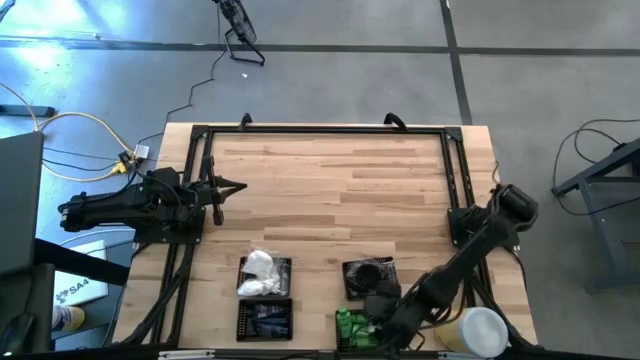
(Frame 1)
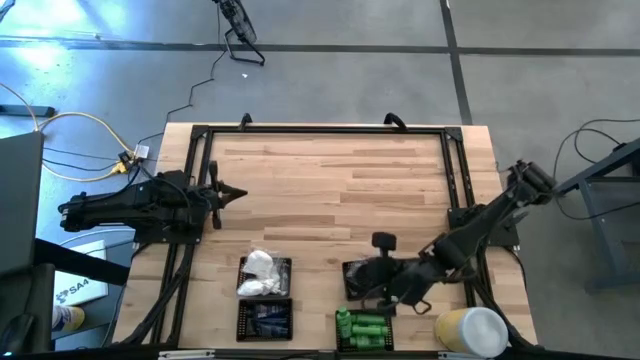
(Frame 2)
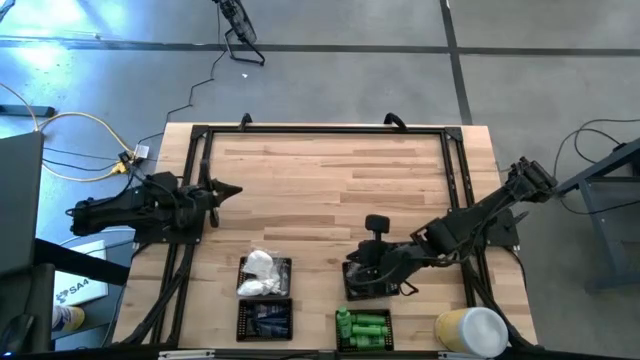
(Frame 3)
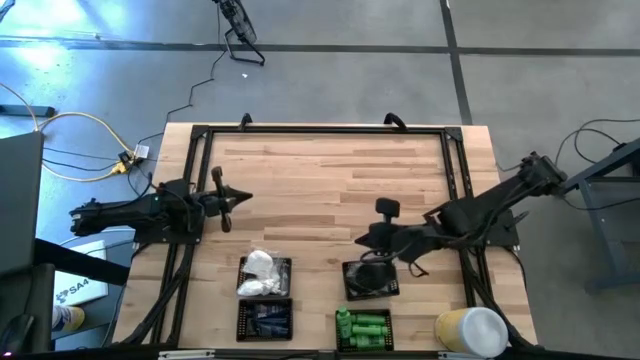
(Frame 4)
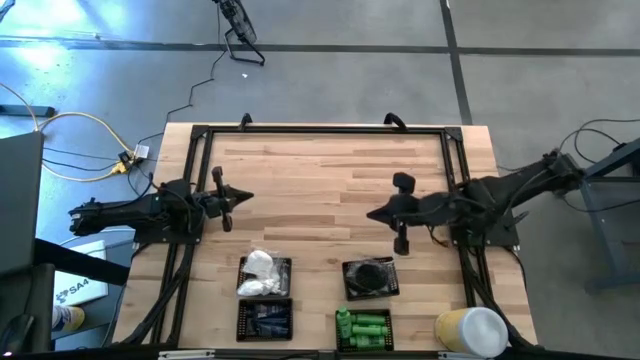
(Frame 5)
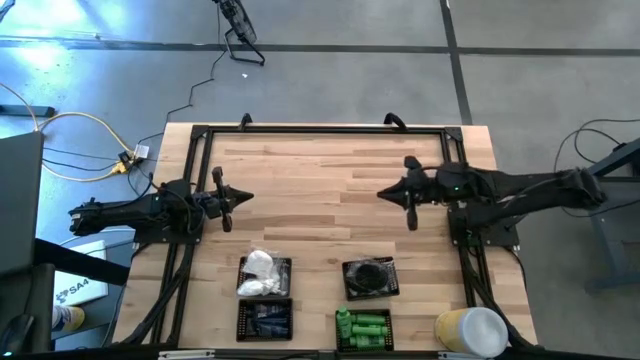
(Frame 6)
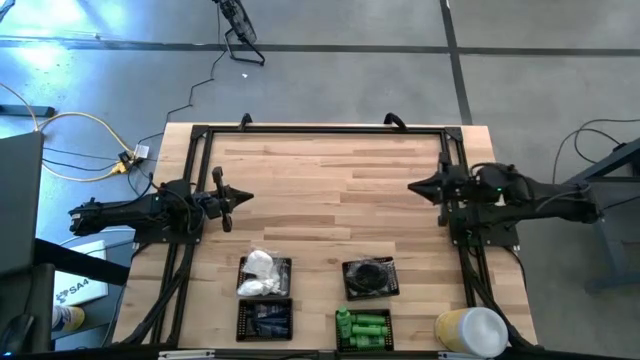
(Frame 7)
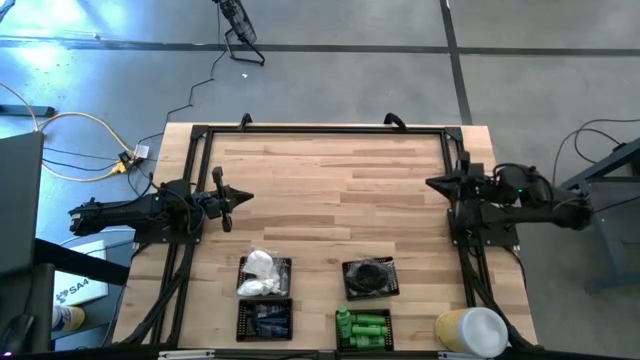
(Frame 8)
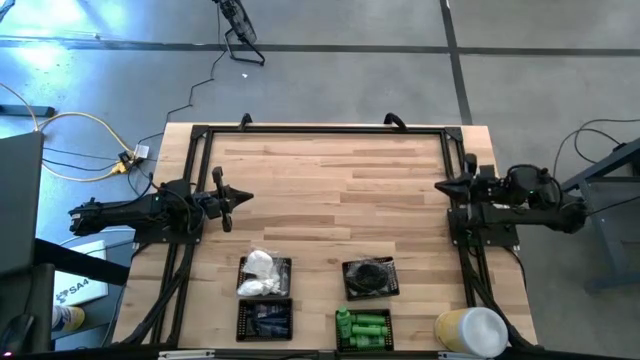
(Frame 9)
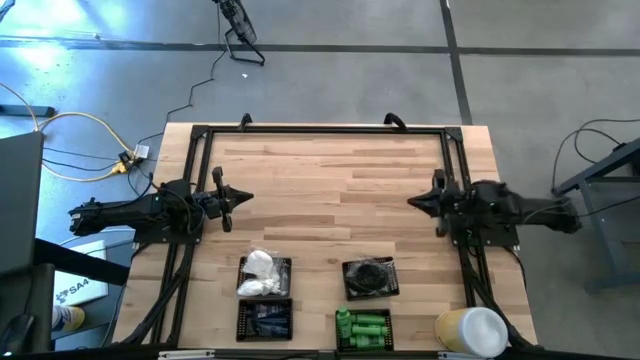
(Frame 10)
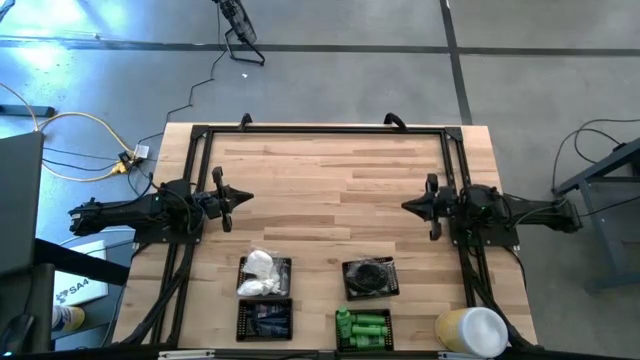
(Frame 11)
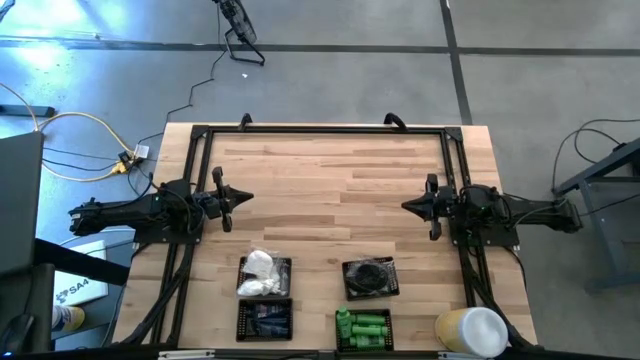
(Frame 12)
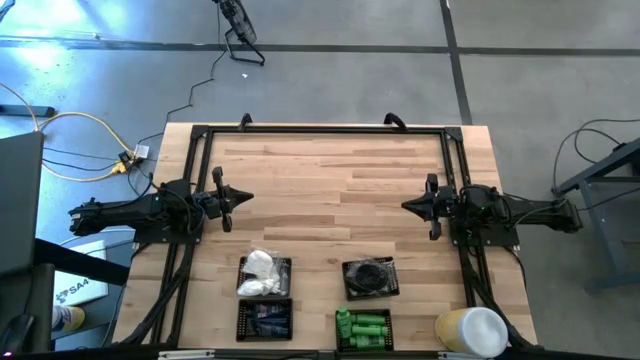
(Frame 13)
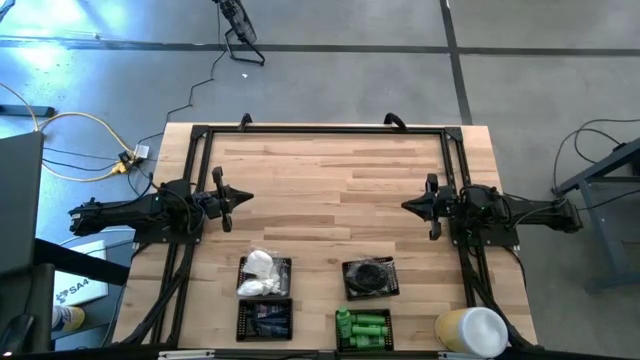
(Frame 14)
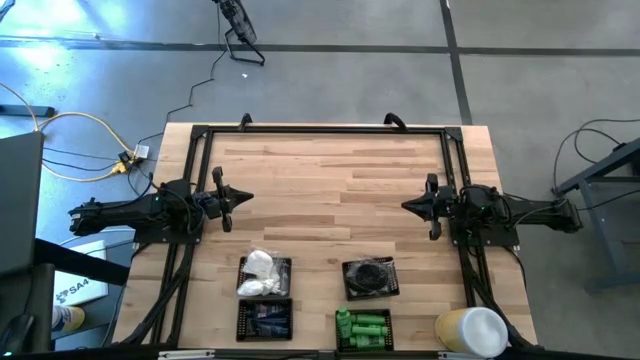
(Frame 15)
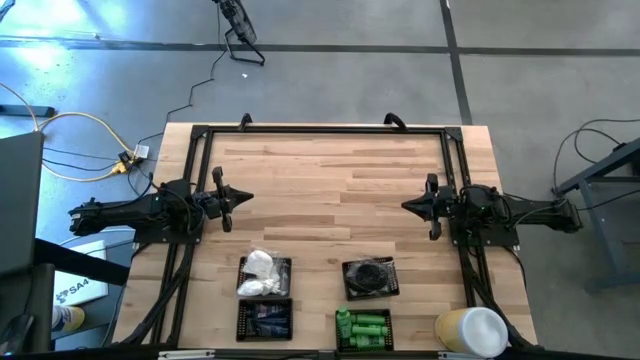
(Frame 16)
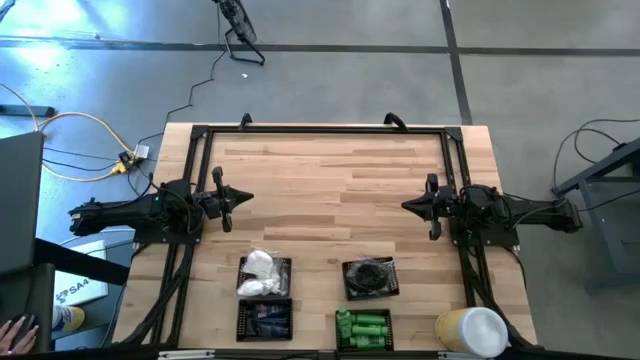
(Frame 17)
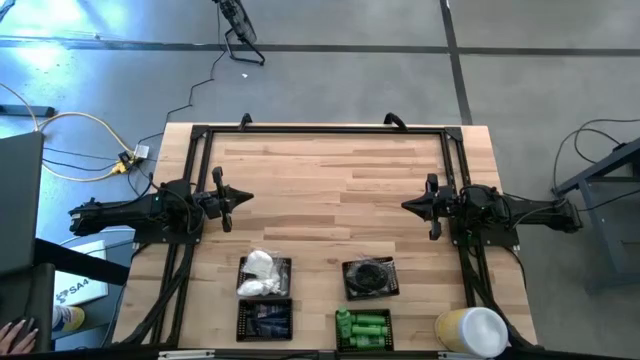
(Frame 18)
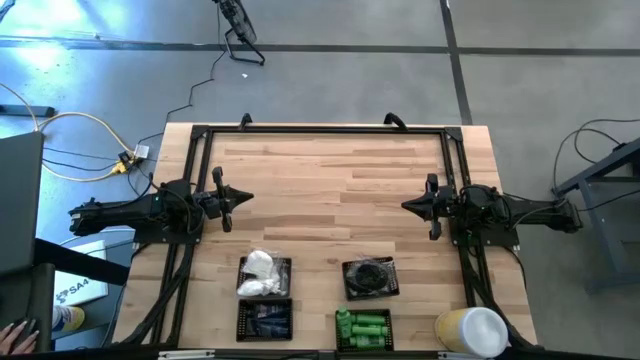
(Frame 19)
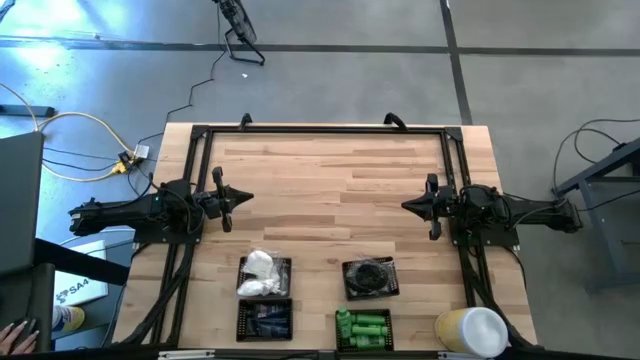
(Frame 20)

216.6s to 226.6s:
Task: Pick & Place Travel size toiletries
Return to Home Position

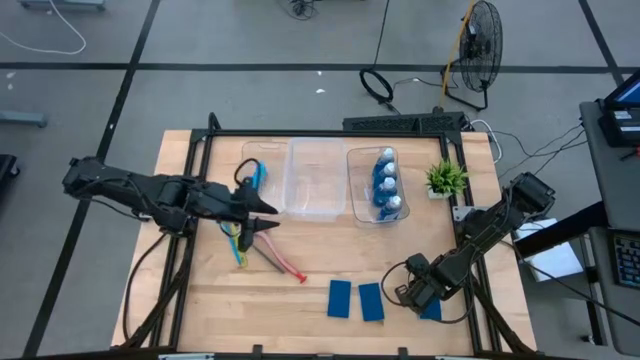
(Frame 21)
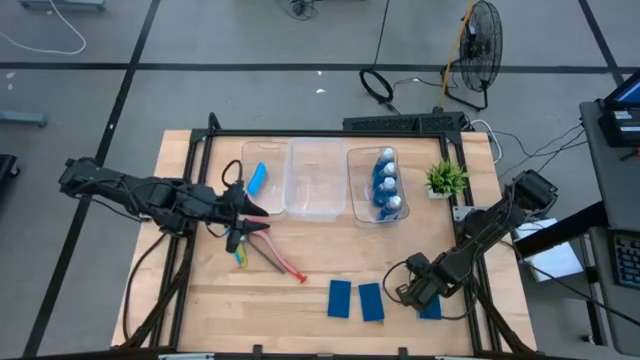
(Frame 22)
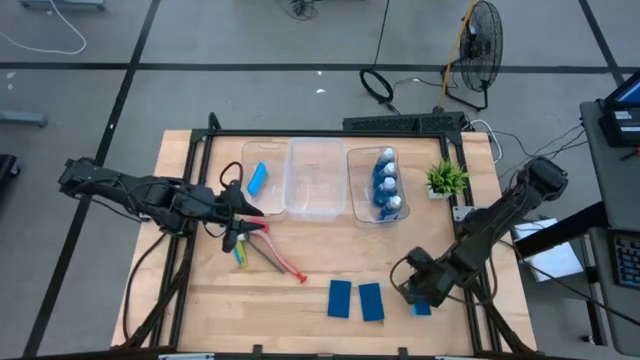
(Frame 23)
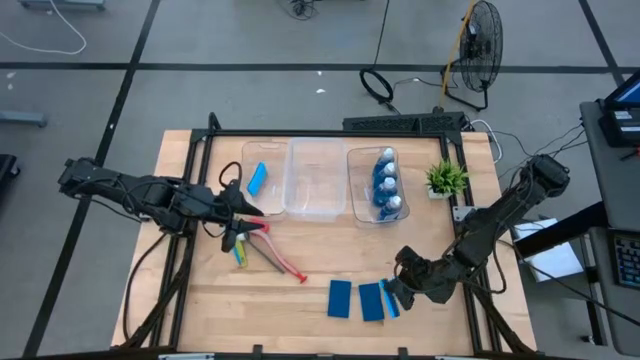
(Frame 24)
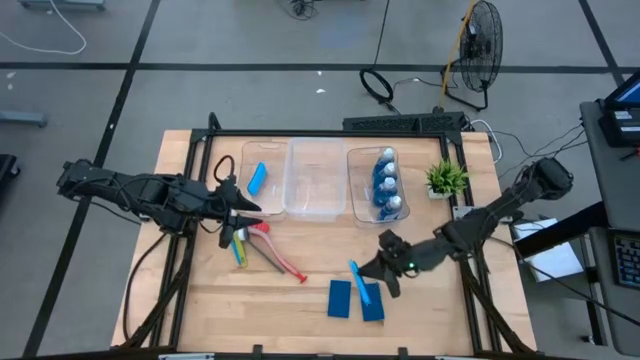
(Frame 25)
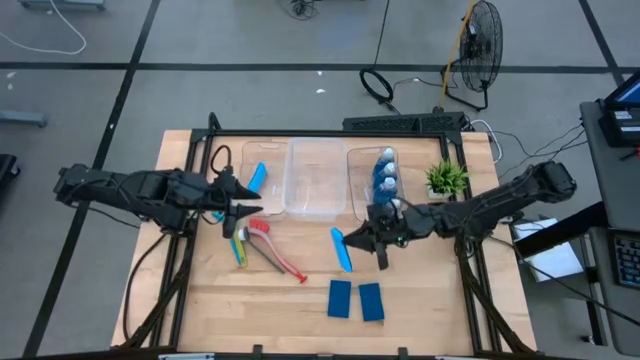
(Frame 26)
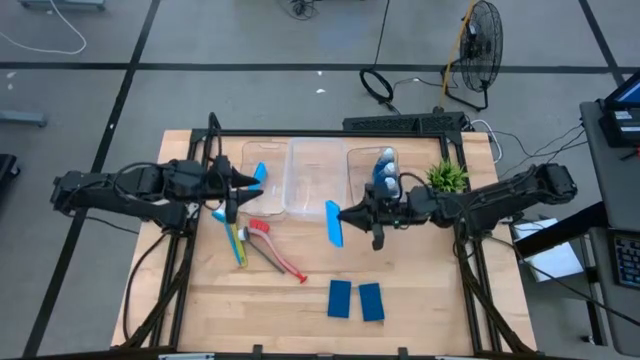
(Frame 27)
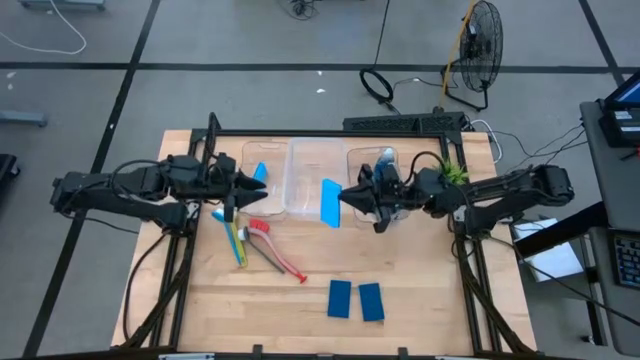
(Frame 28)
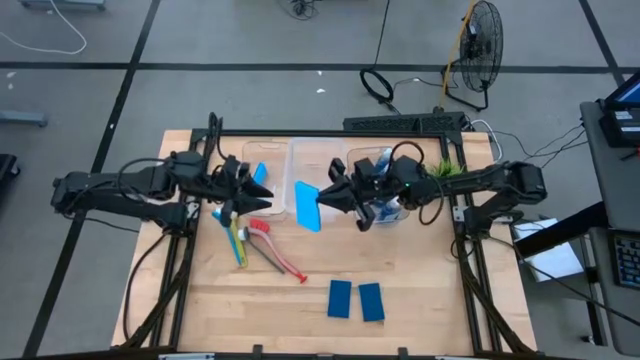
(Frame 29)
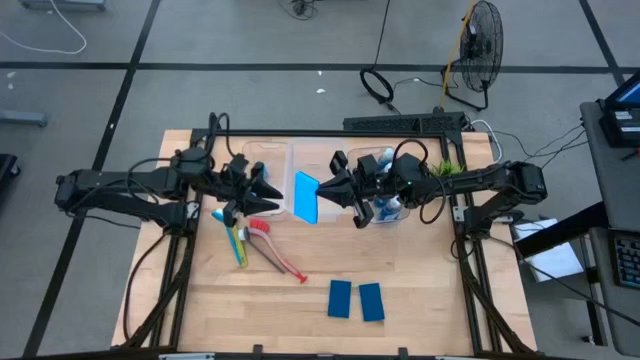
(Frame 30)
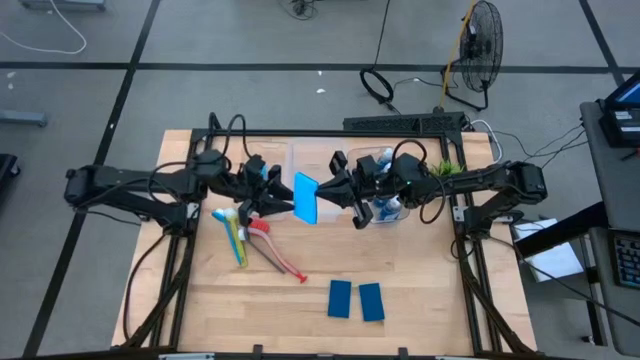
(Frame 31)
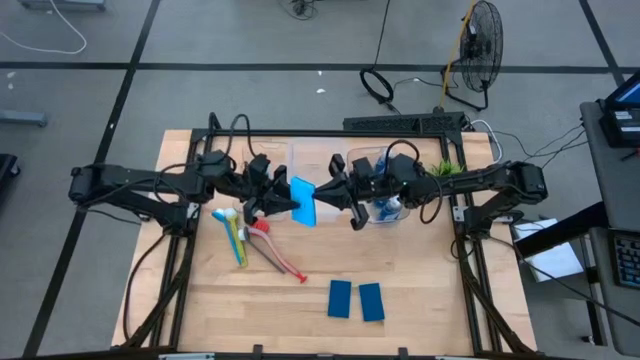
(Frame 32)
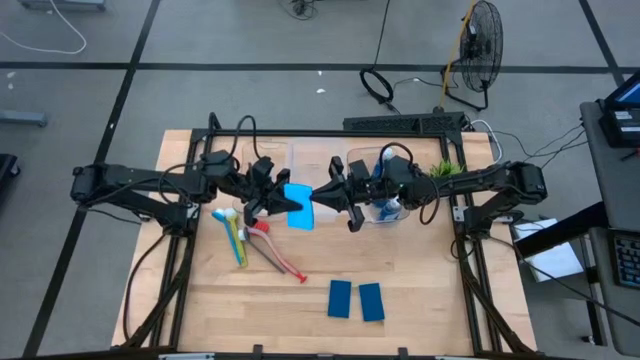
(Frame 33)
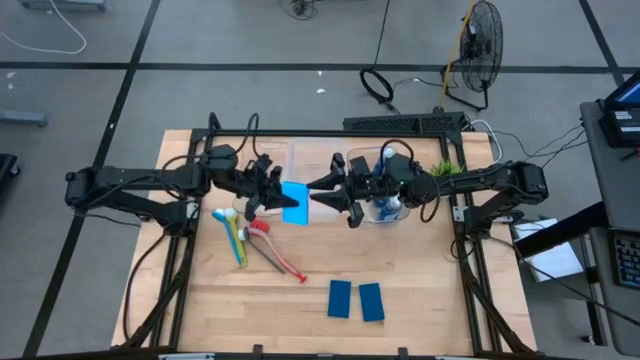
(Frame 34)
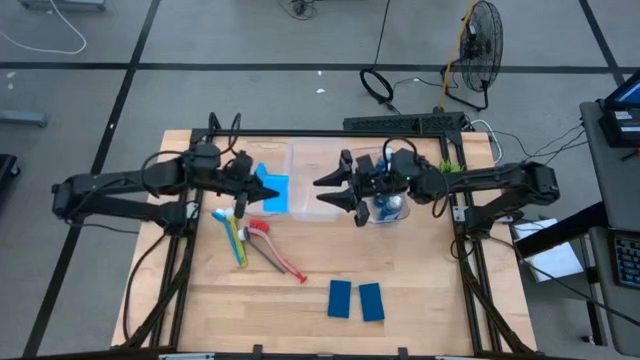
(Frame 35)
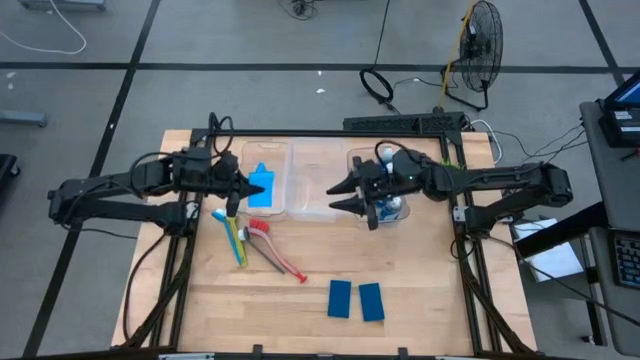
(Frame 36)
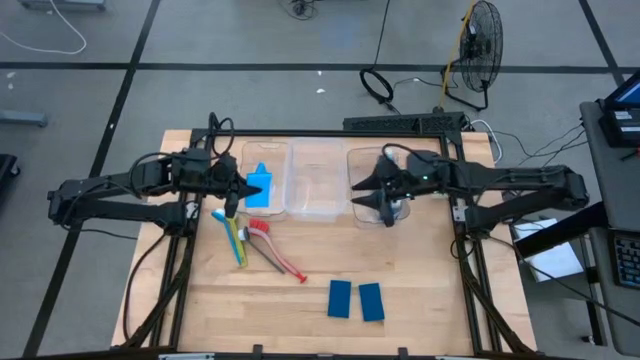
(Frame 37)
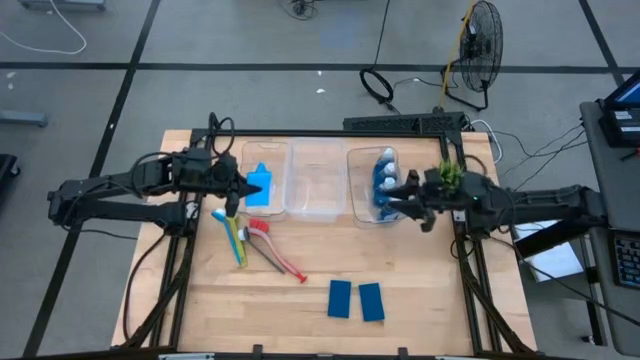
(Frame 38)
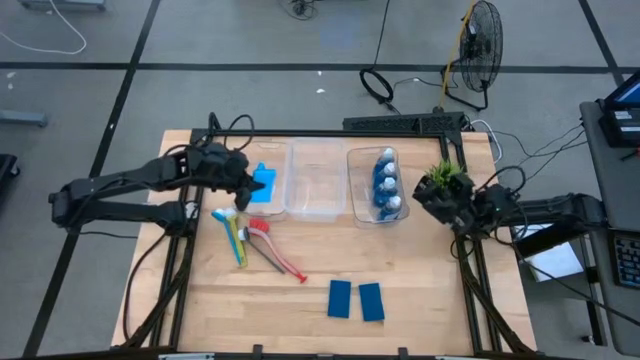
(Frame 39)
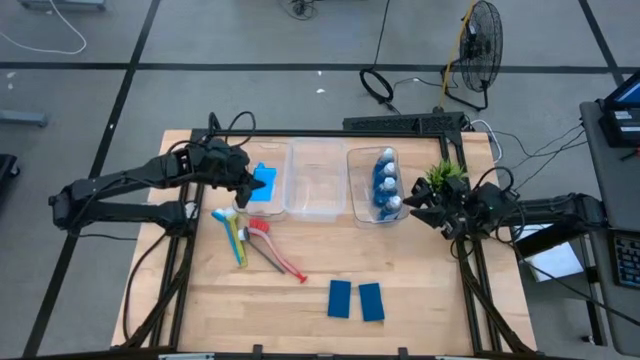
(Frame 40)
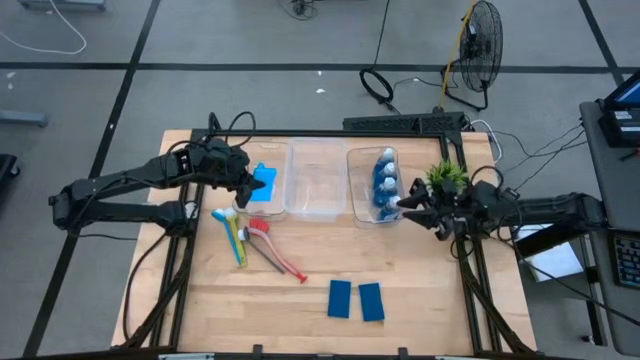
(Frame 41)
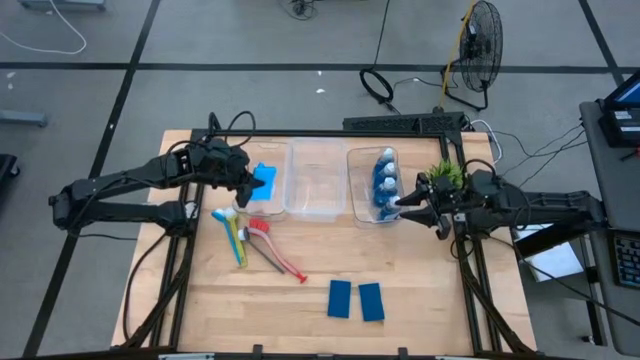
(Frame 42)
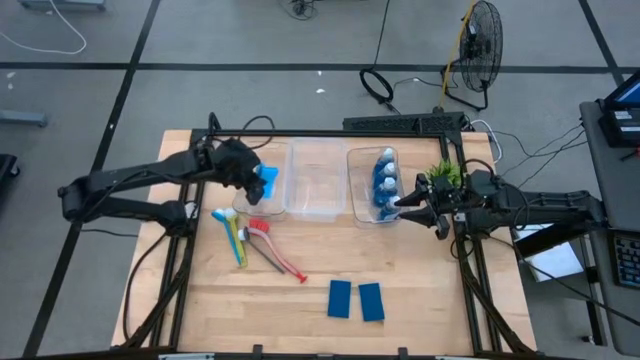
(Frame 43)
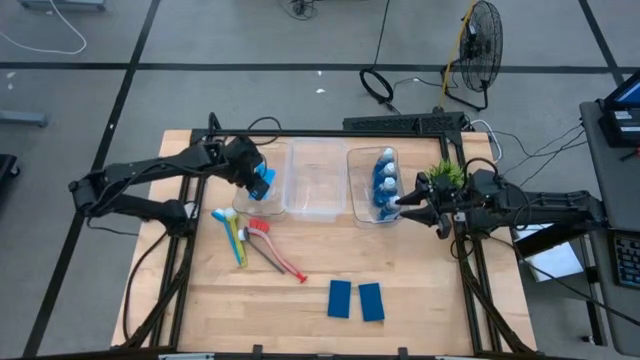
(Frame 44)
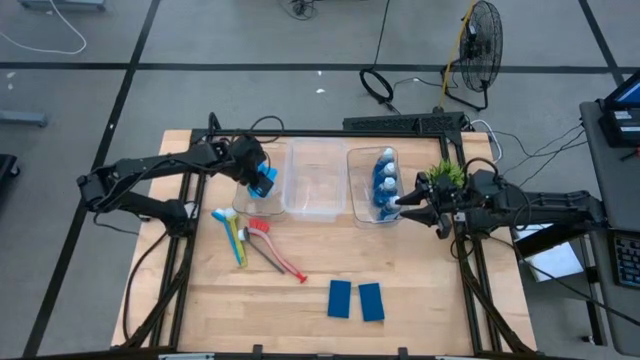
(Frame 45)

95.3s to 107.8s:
Task: Pick & Place Kitchen Sink Supplies
Put the blue sponge into the left transparent bin
